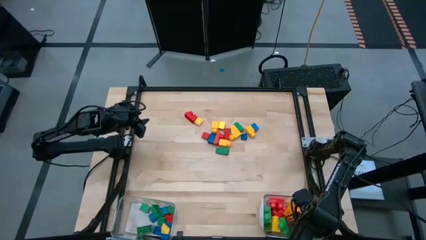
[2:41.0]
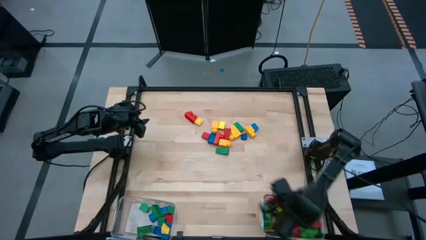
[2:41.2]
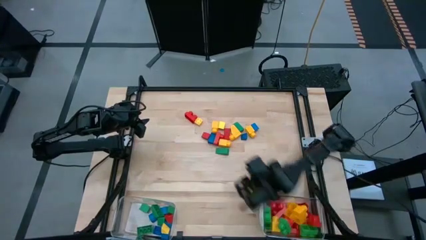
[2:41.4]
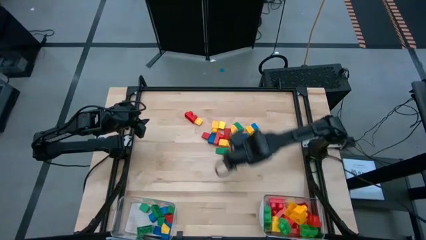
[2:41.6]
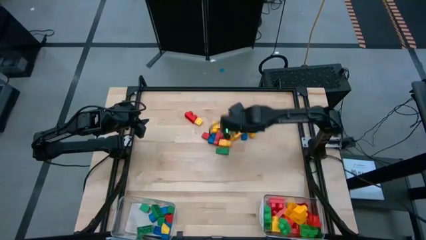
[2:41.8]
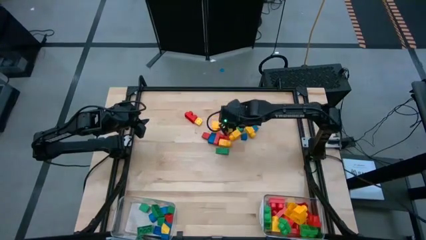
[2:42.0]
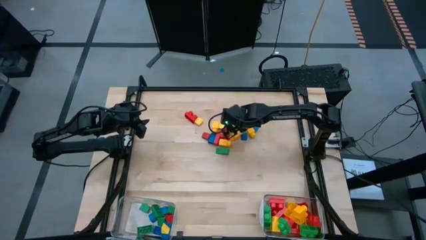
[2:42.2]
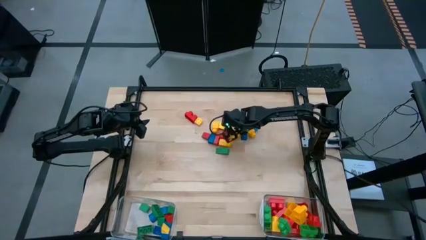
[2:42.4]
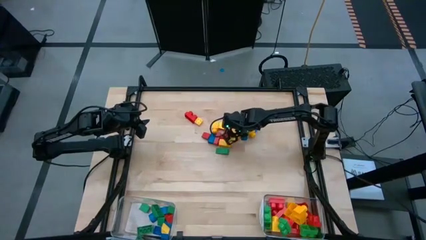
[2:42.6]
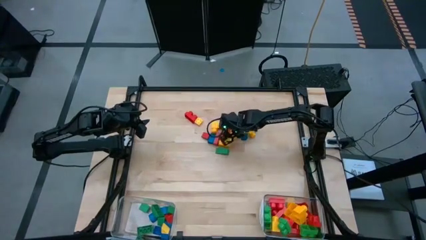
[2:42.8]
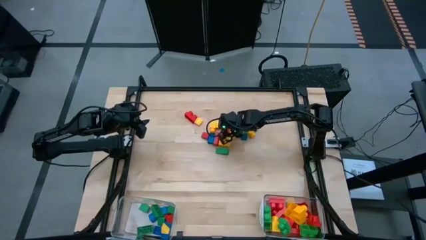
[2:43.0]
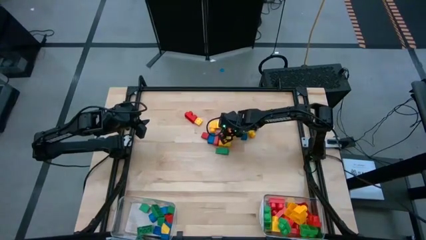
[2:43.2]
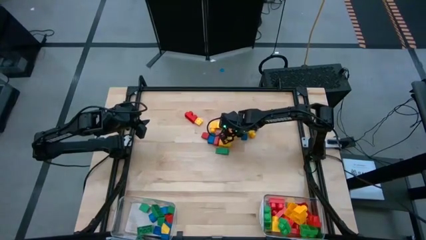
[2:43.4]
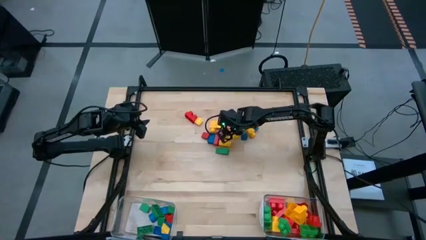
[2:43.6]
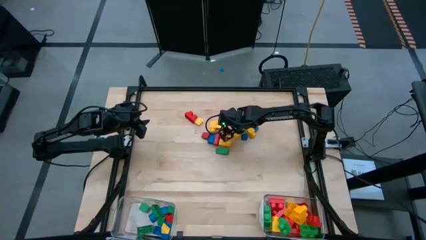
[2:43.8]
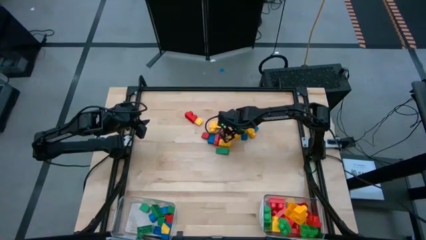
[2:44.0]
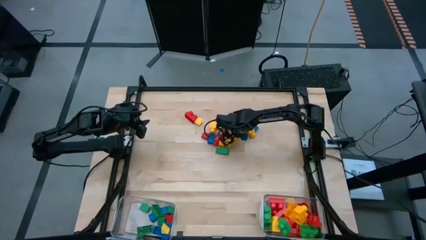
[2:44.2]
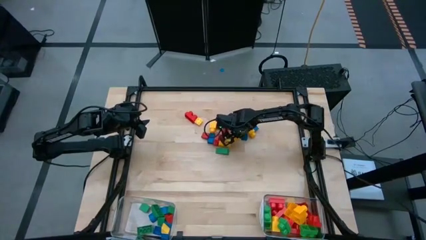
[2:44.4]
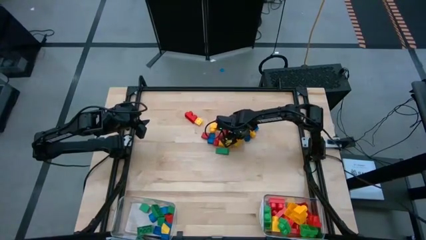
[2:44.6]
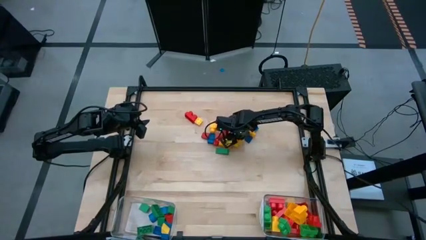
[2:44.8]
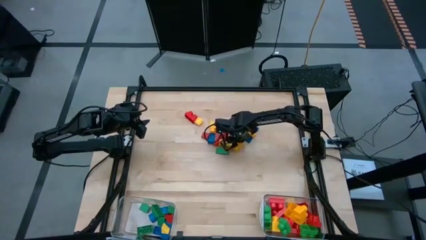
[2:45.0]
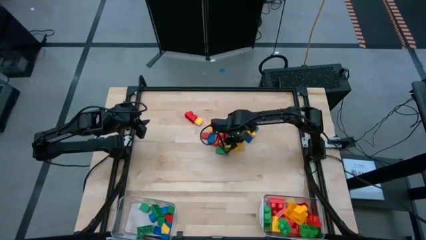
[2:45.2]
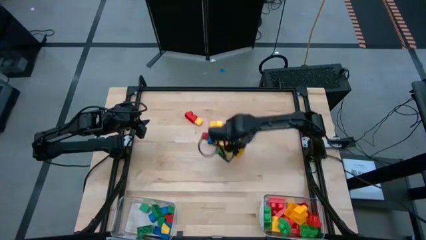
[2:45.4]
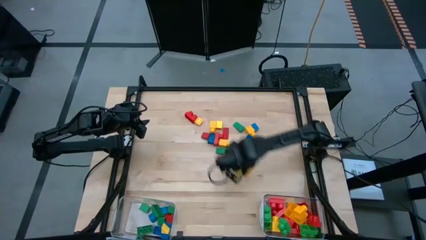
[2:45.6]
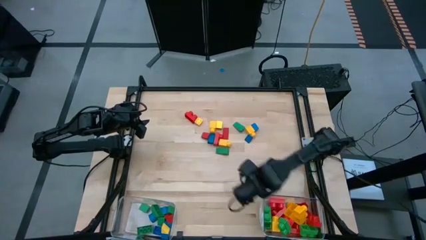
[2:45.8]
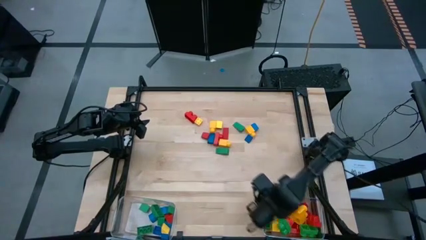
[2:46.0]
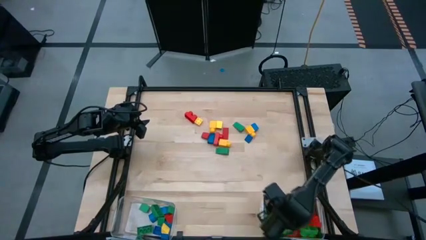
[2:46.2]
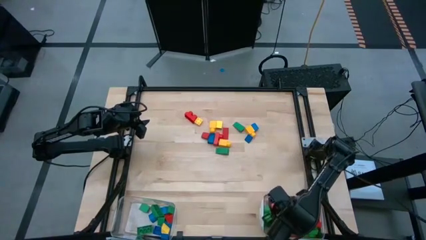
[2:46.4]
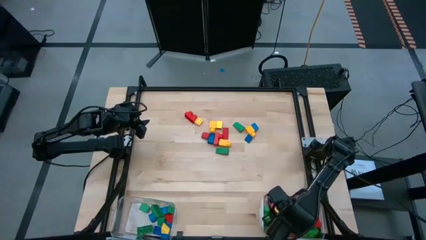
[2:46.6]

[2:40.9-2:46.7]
Task: Sort blocks by size
Put the yellow game piece into the right transparent bin

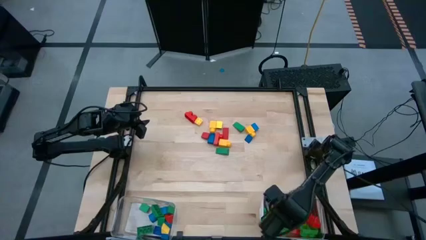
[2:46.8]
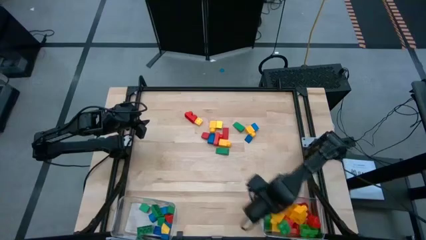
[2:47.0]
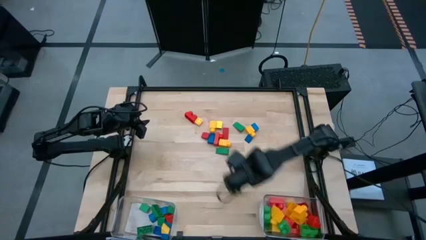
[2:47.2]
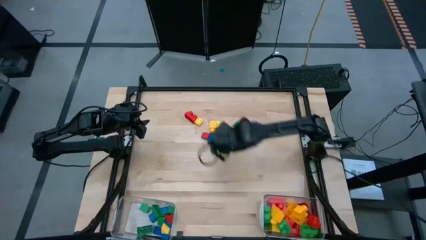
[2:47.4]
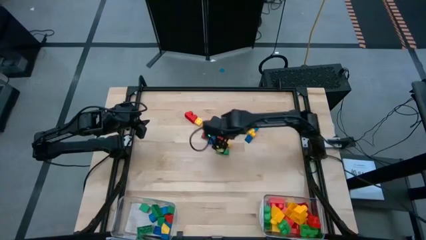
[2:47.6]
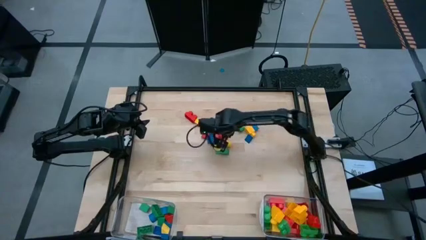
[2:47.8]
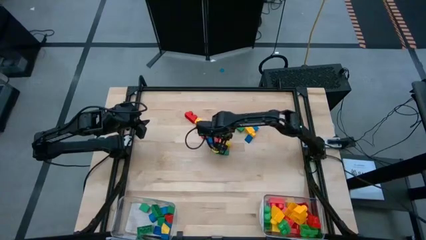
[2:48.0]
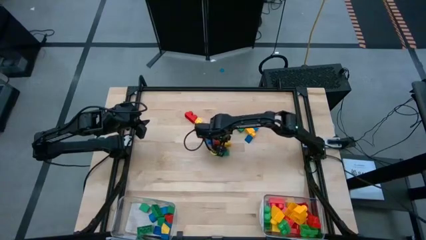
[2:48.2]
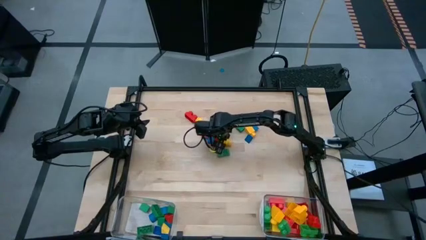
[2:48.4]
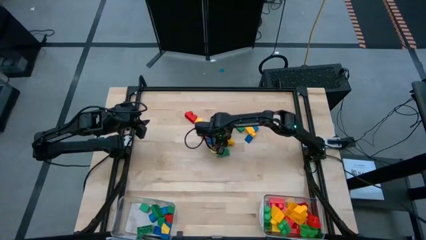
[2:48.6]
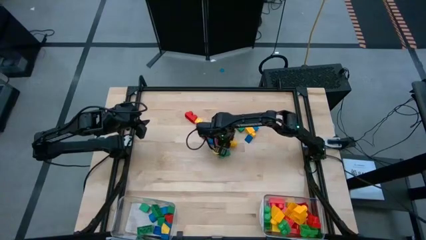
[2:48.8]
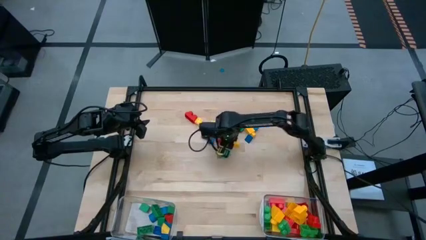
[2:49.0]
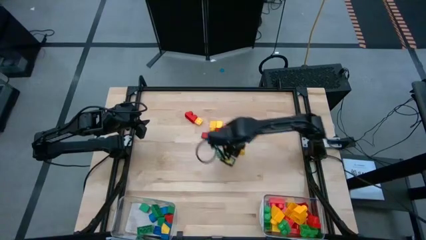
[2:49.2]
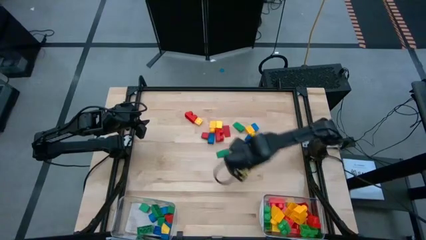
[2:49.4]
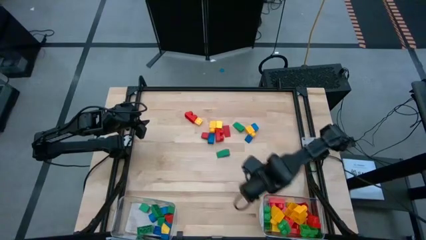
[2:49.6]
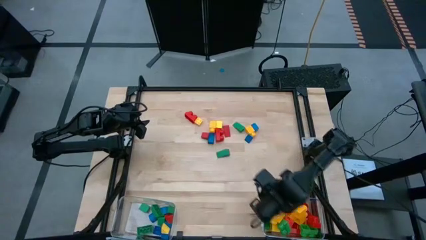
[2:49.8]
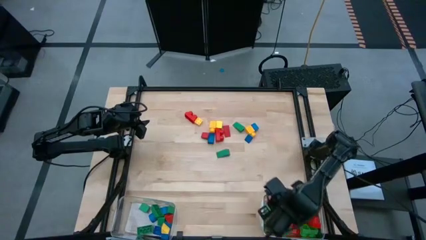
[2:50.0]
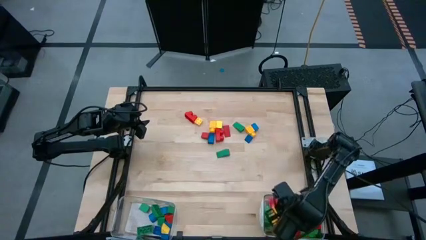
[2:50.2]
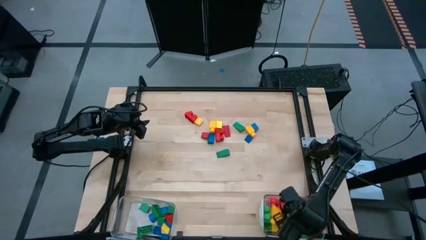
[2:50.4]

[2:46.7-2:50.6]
Put the yellow game piece into the right transparent bin

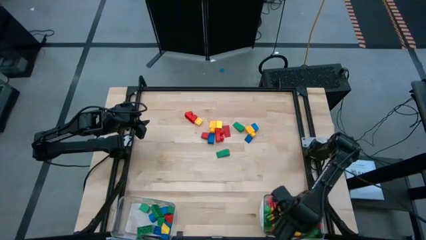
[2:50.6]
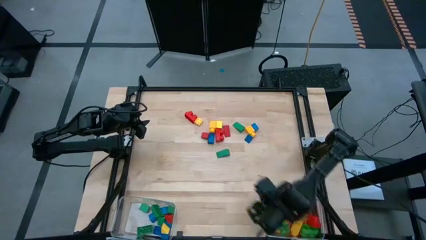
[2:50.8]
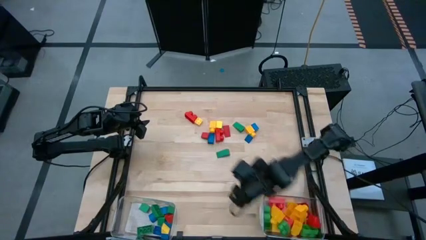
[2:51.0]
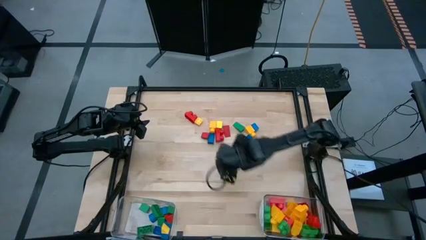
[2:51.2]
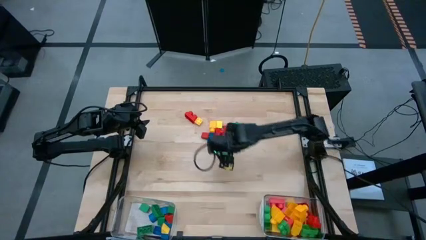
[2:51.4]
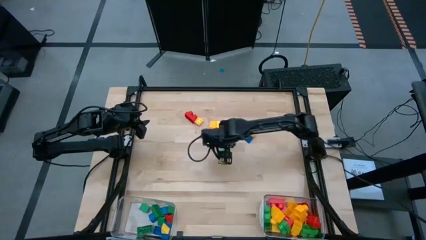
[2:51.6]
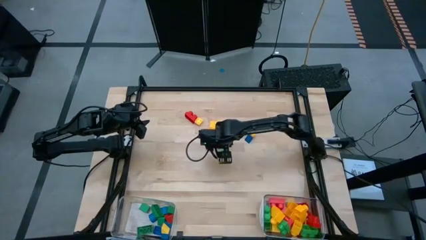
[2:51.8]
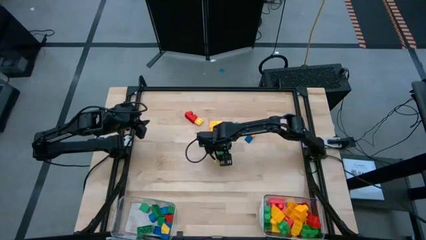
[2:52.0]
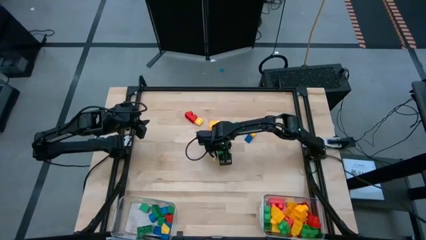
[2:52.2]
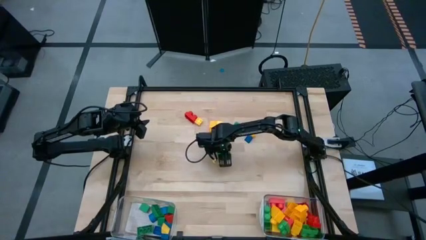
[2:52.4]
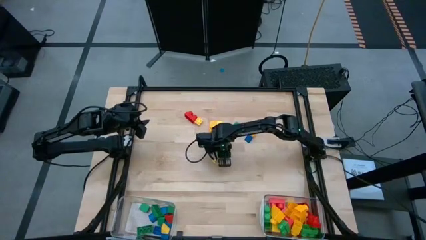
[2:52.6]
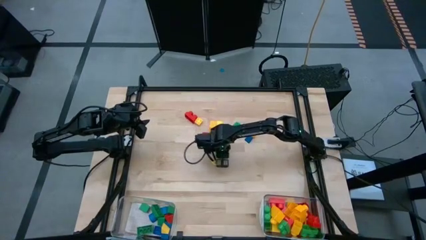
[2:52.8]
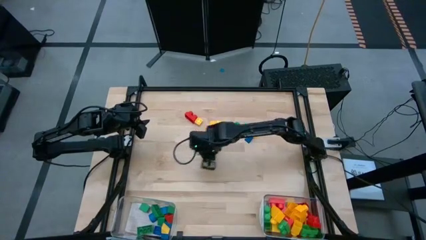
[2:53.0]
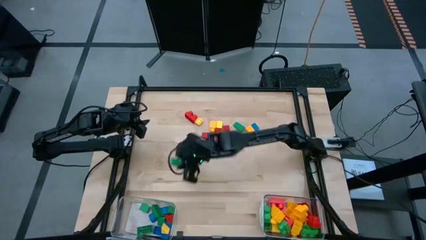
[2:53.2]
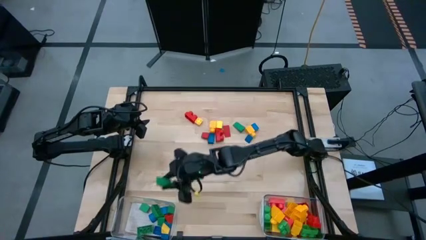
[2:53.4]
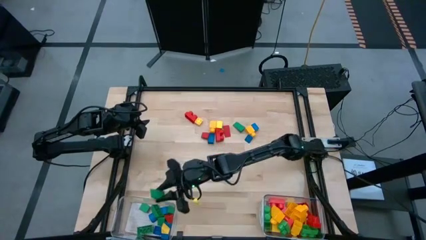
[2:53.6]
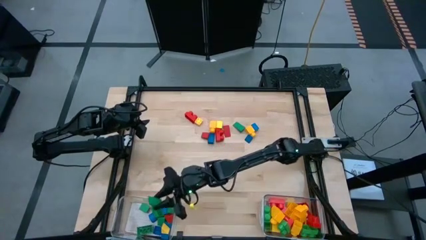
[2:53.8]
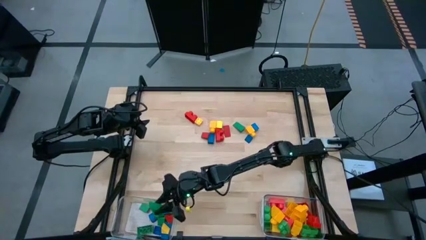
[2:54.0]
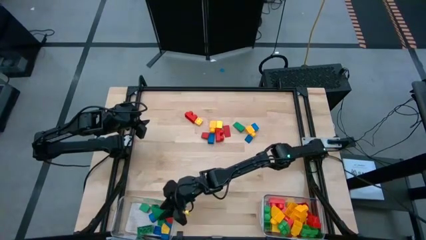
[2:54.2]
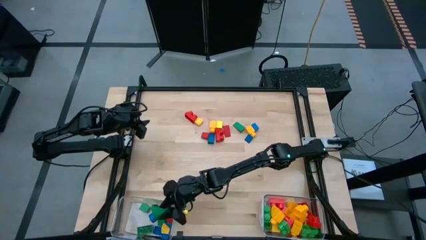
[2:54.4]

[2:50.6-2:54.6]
Put the green triangular block into the left transparent bin

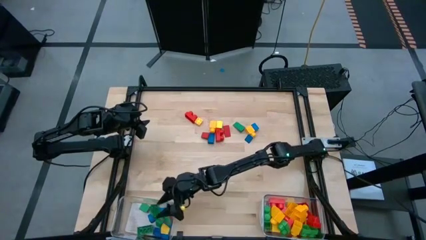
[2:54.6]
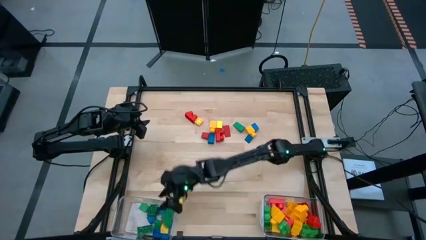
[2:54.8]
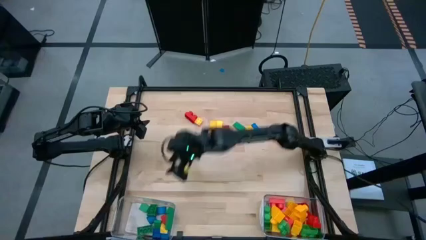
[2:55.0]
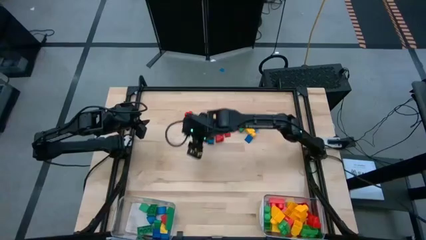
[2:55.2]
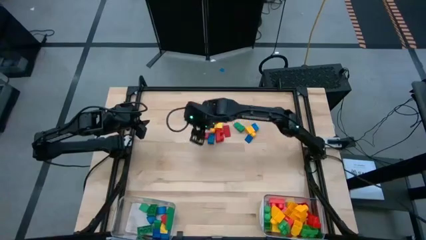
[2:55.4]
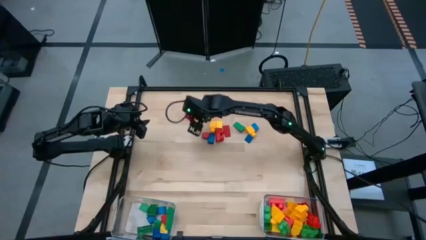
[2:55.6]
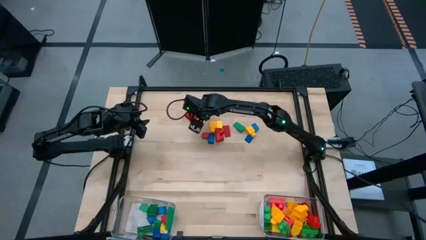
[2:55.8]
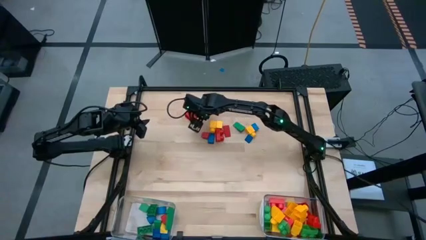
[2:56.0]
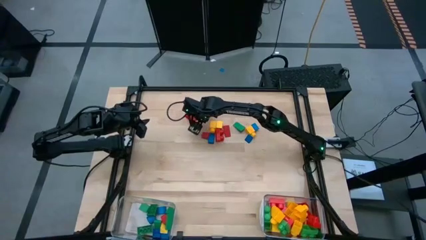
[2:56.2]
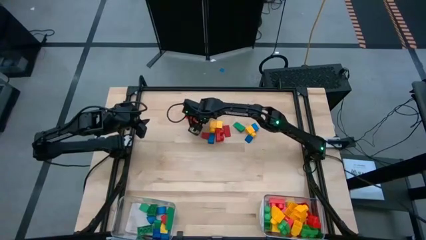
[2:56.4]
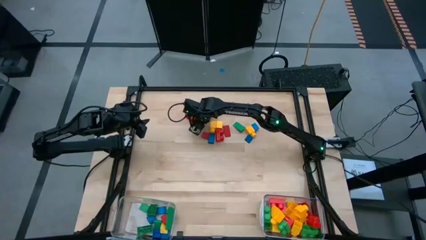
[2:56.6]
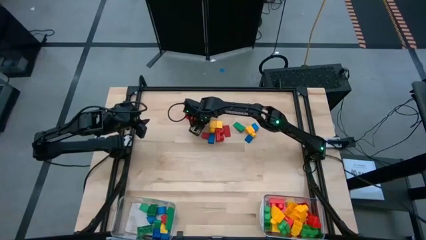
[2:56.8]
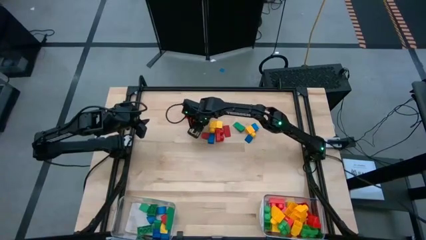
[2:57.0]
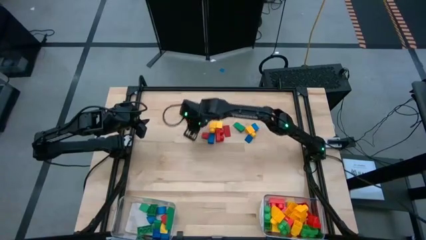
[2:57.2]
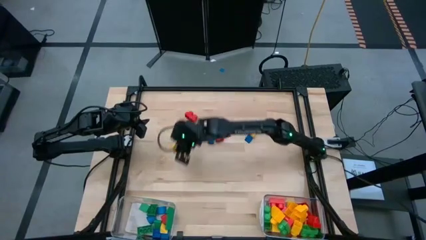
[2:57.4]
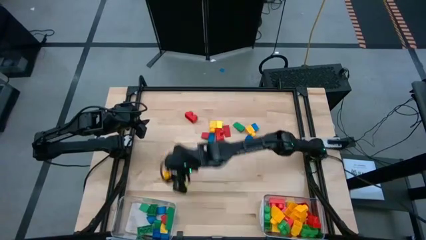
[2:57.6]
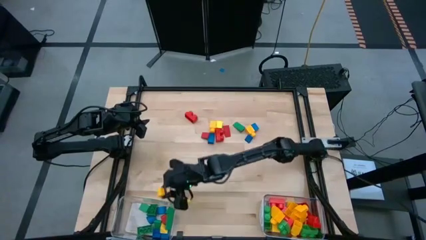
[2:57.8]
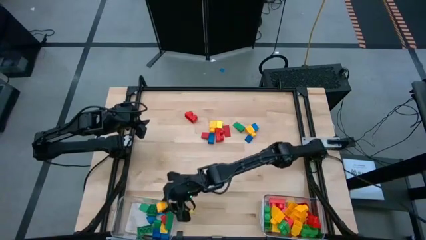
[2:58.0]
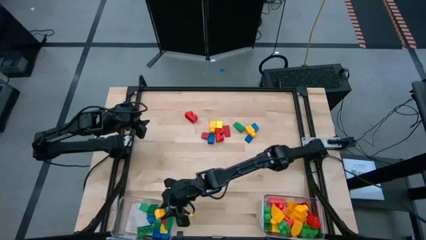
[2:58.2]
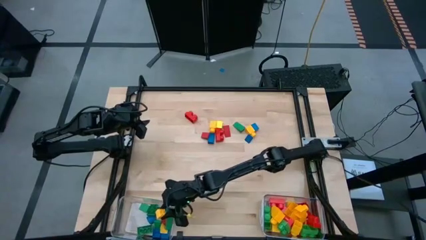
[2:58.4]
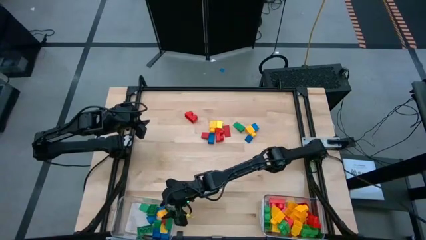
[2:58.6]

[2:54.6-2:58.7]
Put the yellow game piece into the left transparent bin
